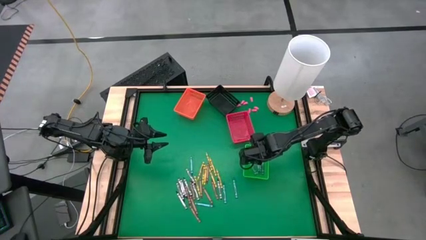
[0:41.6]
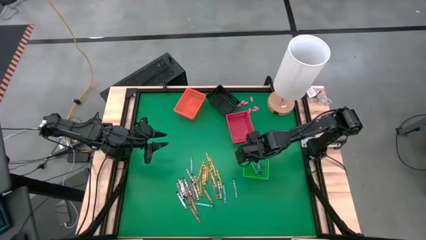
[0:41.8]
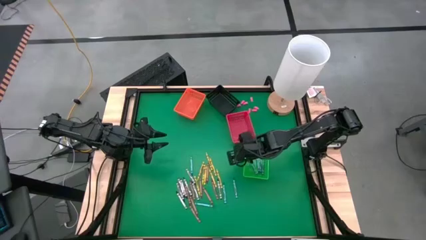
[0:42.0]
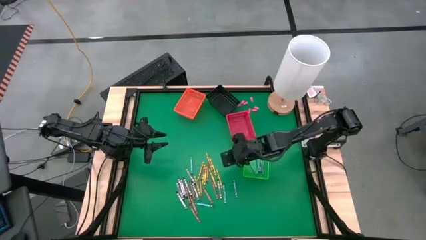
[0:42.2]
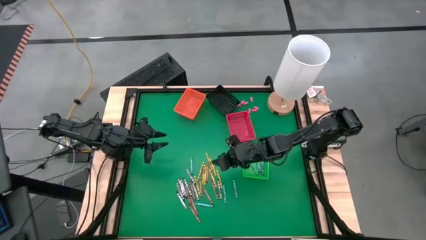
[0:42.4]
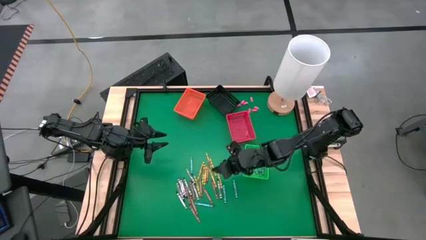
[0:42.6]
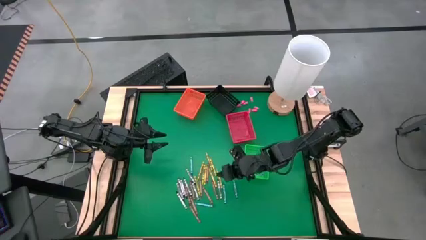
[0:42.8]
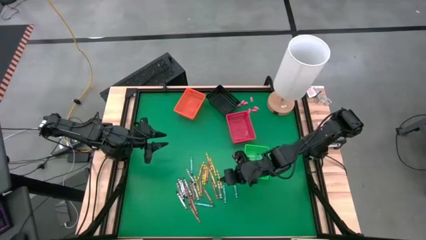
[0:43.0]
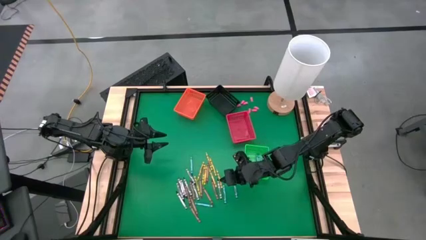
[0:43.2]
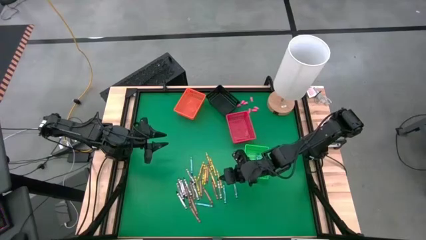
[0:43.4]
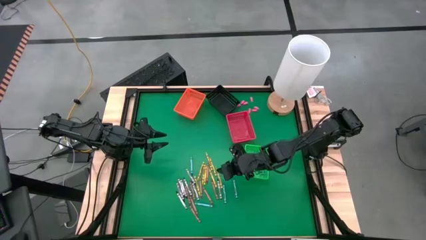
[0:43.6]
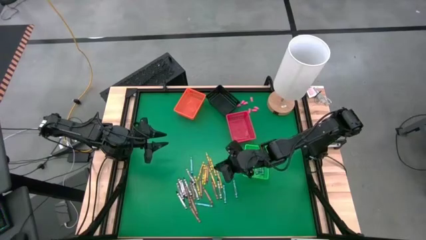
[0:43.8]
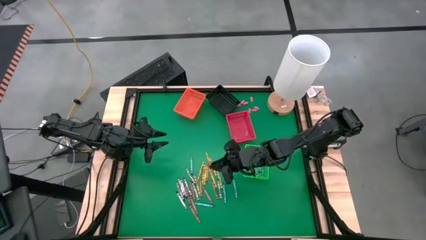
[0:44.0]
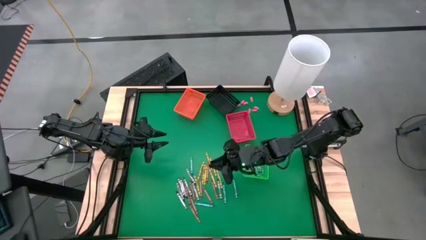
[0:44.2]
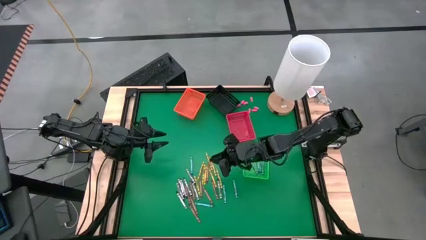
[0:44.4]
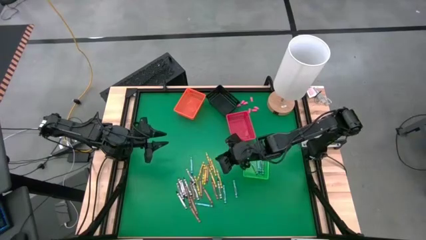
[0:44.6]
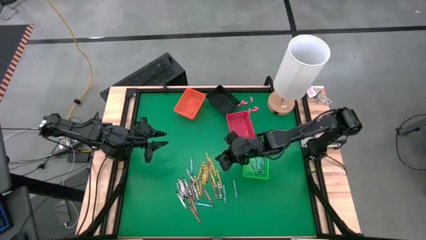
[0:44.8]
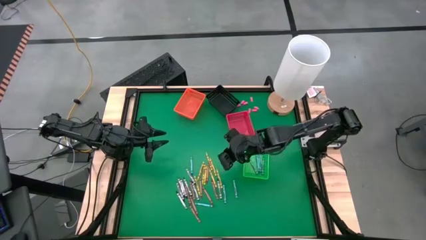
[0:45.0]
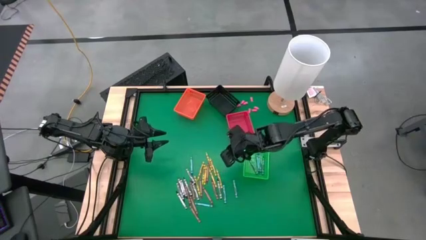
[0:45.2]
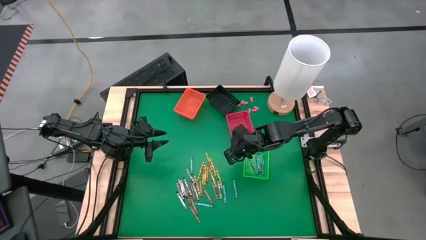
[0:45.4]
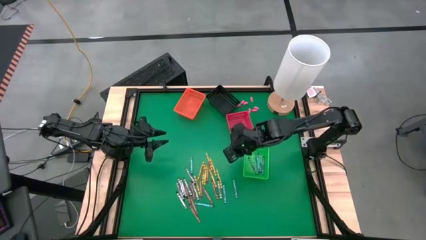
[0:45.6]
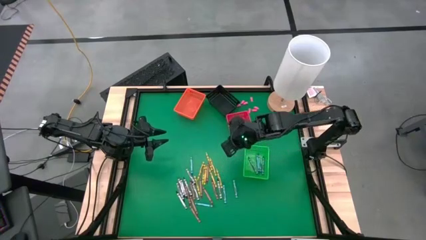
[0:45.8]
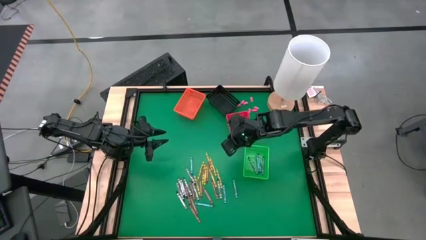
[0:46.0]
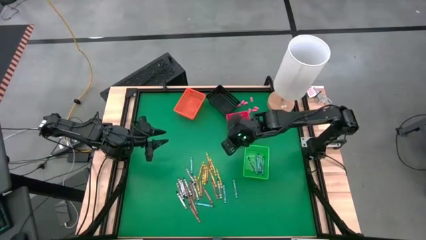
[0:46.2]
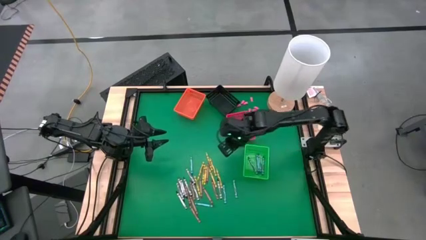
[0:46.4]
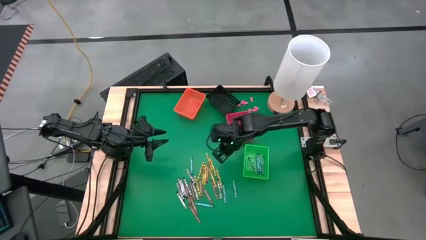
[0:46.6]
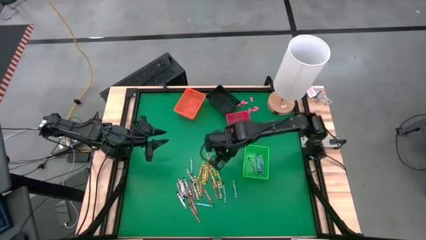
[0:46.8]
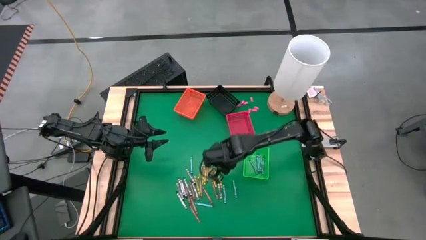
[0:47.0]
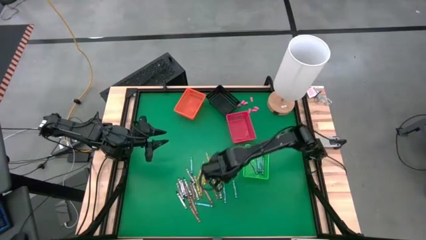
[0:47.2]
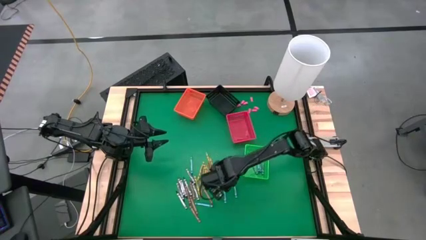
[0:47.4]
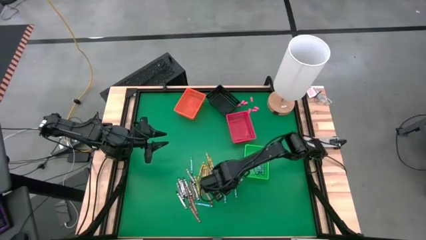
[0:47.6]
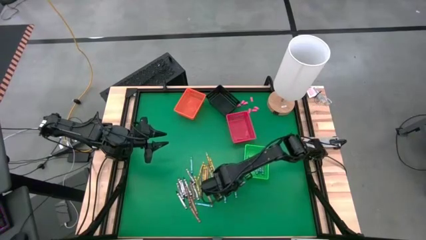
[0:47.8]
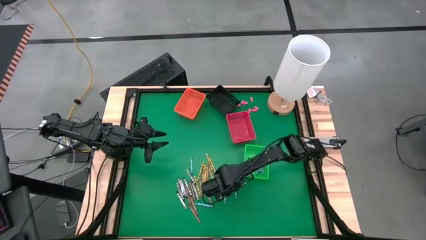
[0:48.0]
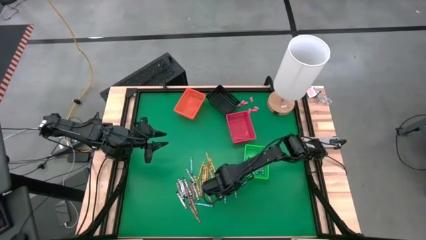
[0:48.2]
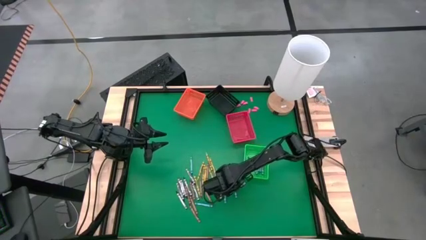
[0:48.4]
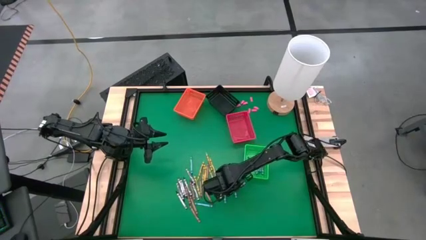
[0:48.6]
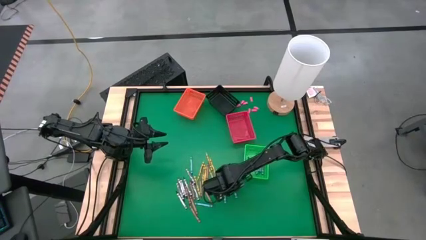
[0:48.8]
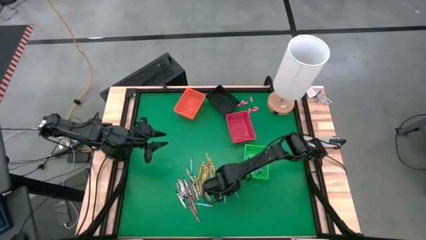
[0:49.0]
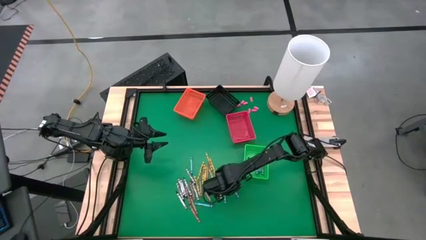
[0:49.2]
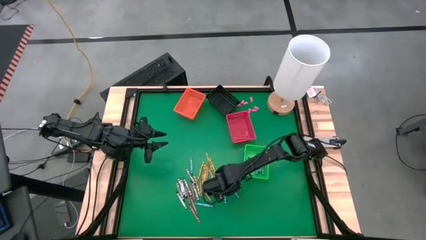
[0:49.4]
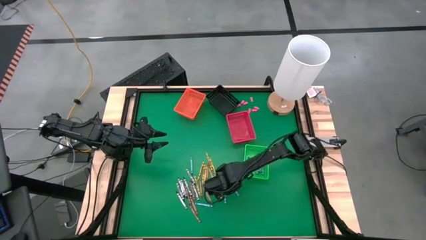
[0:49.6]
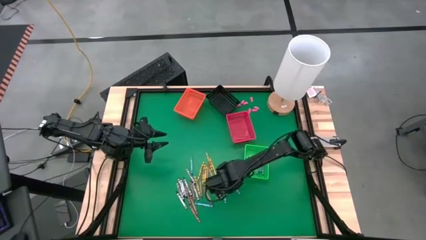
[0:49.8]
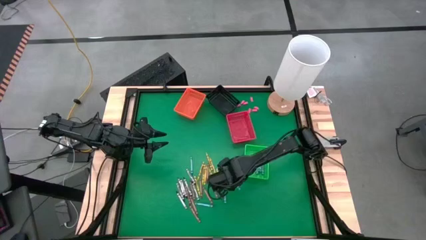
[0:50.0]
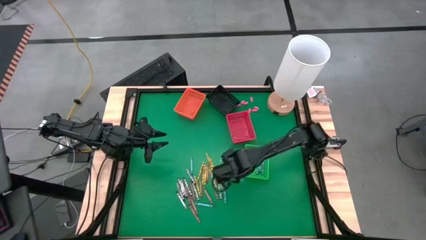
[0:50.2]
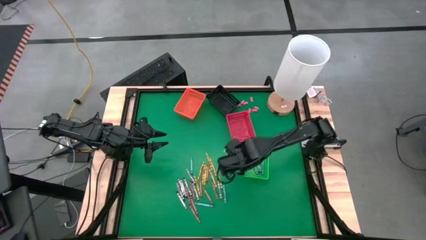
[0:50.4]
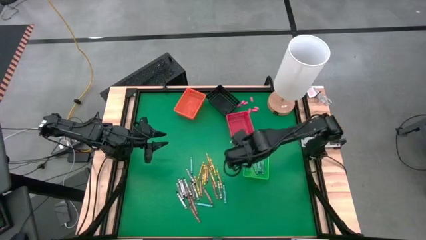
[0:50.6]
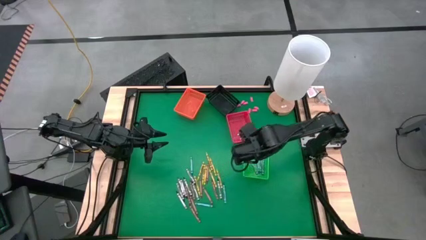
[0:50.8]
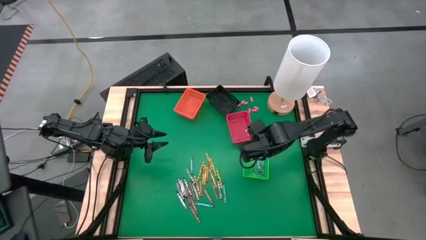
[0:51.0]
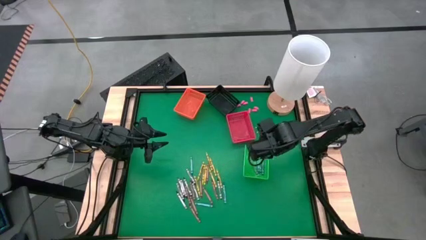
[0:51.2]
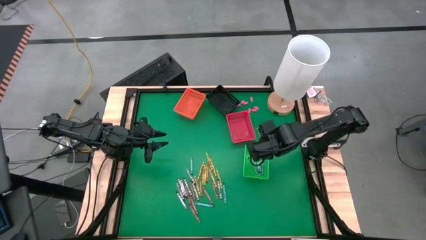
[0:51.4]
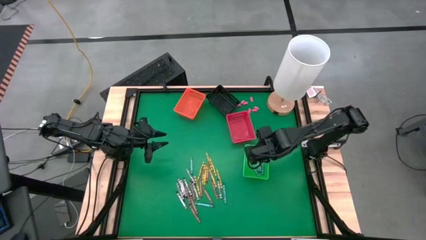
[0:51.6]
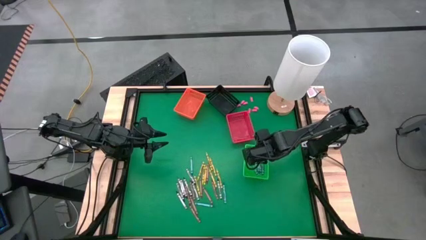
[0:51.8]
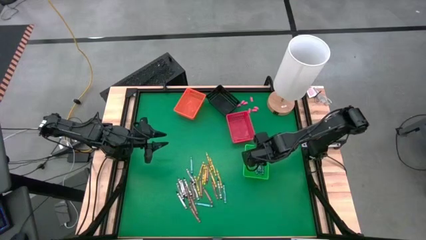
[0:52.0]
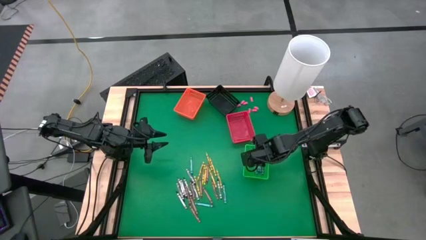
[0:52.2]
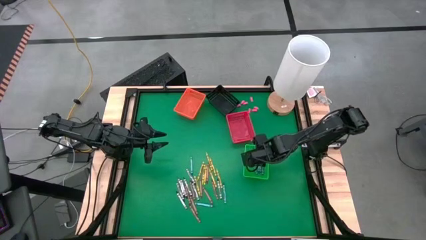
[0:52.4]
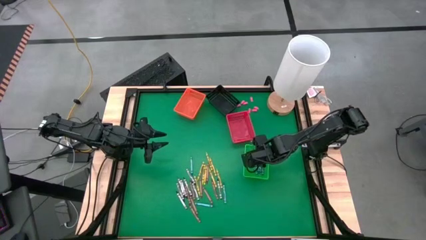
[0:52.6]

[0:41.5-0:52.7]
Task: Sort crayons
Put the light blue crayon into the green bin

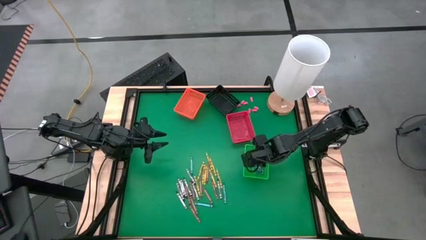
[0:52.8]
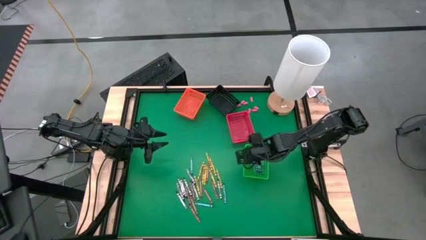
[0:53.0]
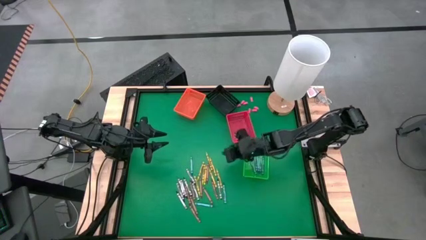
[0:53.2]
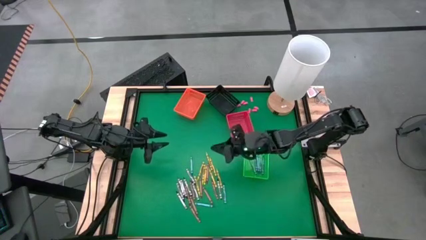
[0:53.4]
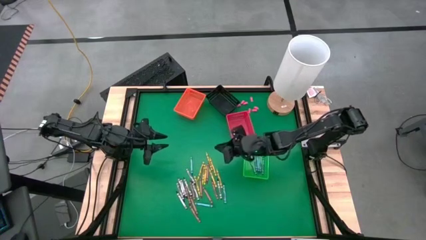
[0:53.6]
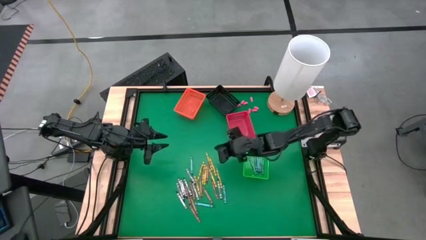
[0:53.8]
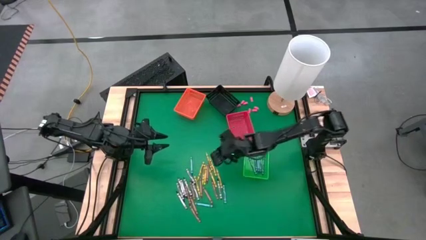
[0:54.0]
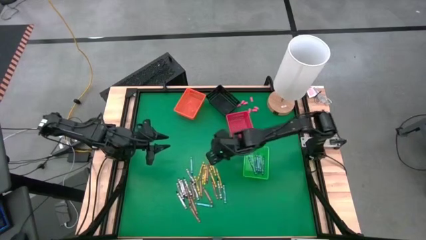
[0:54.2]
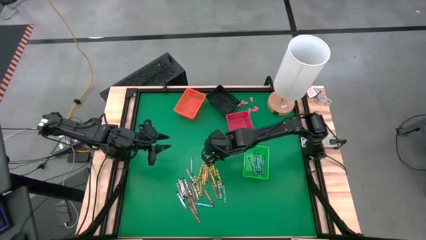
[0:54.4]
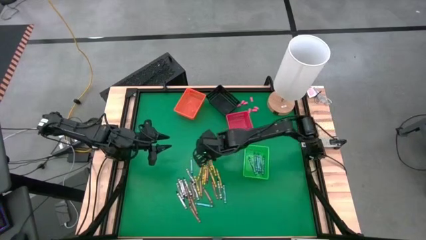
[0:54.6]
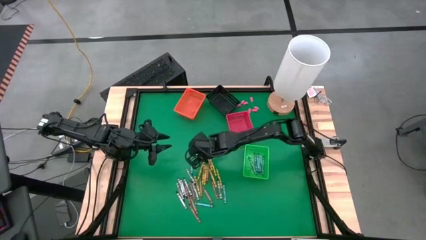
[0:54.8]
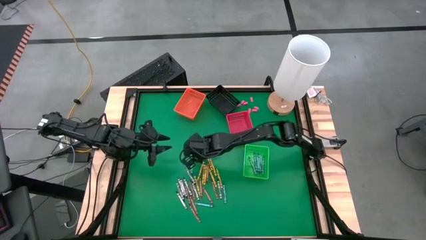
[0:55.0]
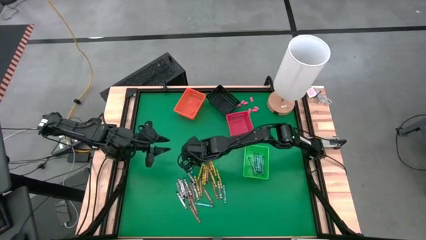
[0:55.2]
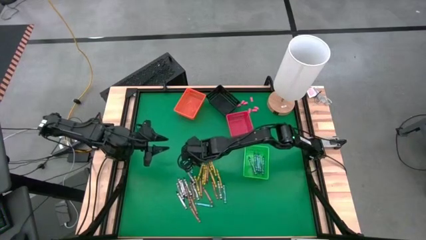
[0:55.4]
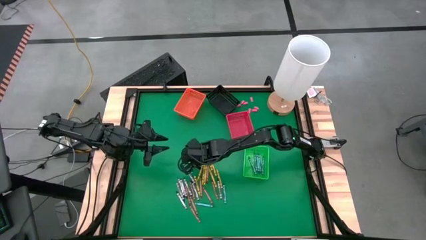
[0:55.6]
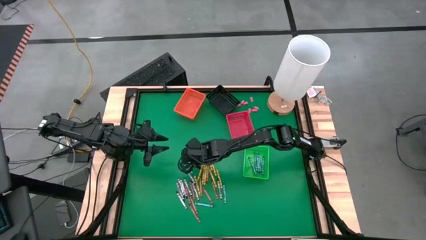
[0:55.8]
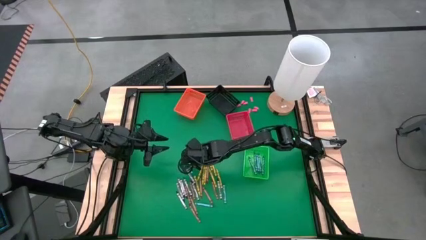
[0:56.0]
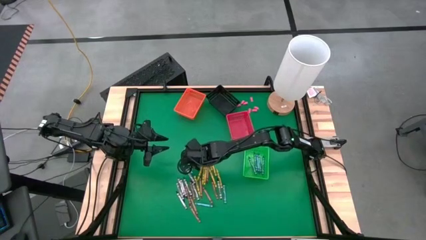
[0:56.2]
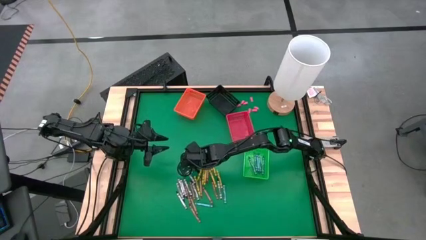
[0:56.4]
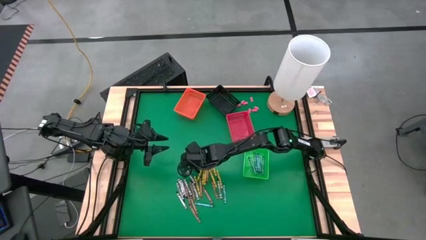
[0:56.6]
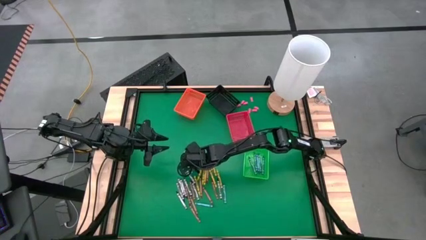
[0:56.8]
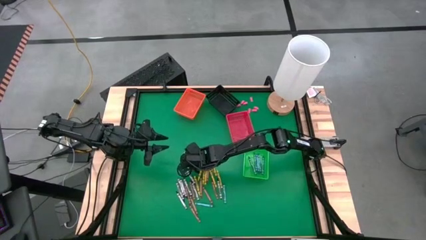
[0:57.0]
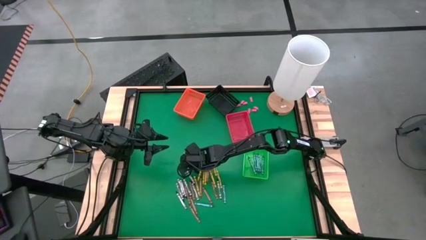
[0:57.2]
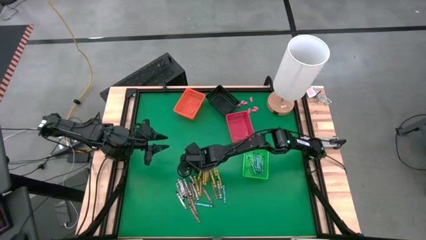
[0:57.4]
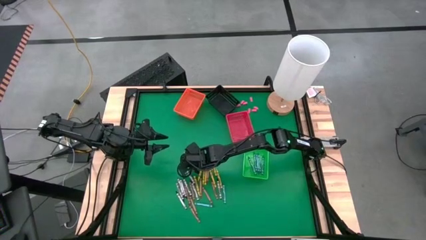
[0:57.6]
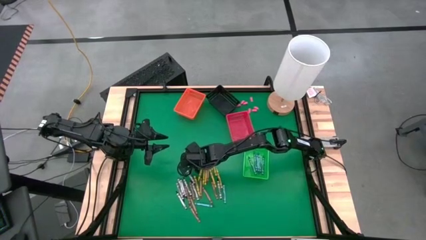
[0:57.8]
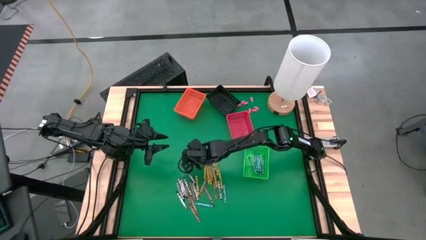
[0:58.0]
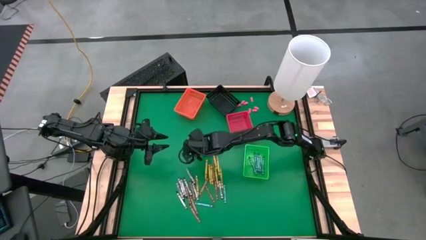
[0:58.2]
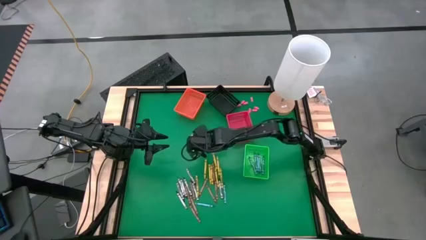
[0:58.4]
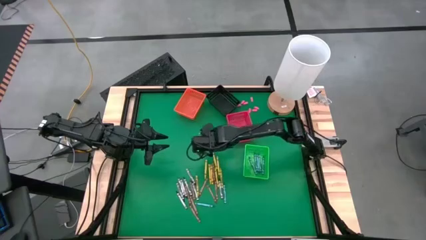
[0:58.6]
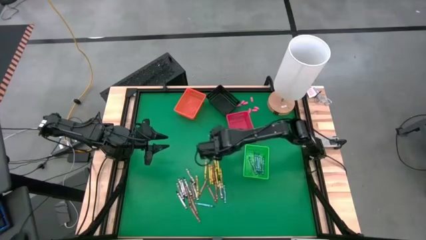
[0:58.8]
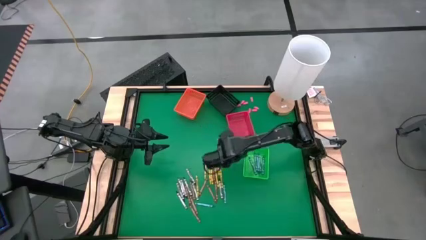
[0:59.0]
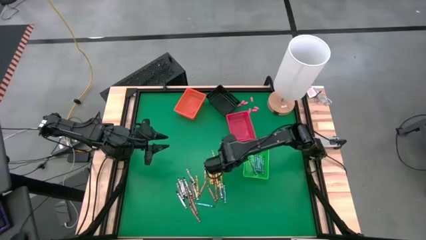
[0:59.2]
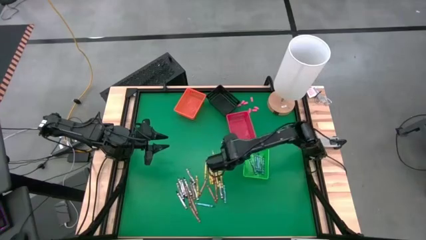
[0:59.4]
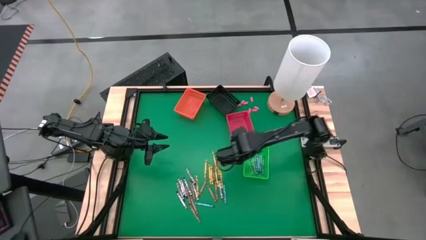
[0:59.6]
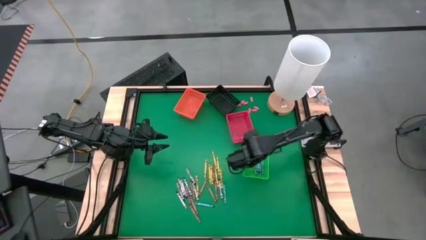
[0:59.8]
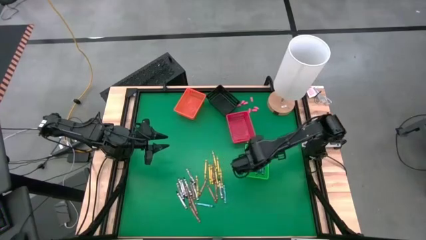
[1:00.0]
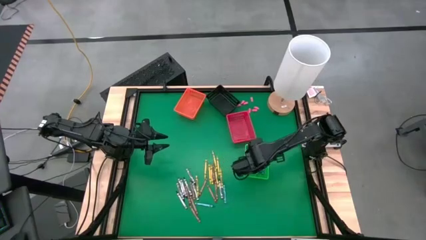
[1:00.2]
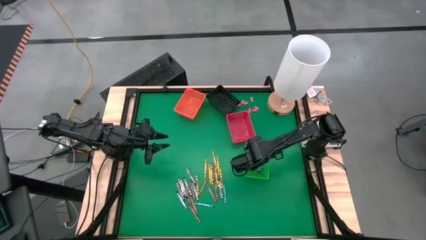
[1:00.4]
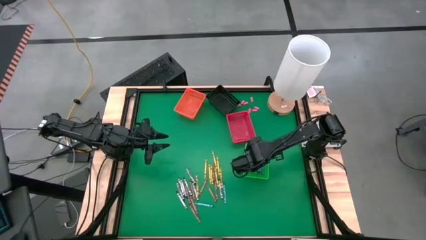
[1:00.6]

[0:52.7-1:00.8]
Put the light blue crayon into the green bin
